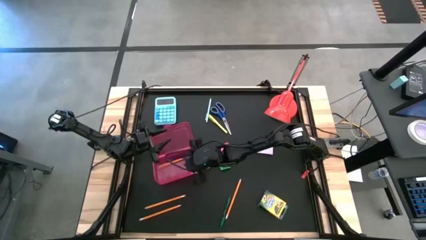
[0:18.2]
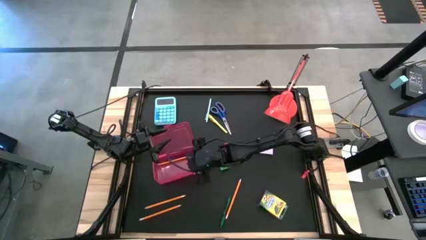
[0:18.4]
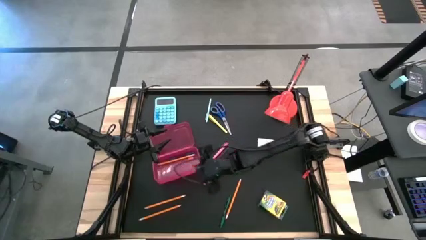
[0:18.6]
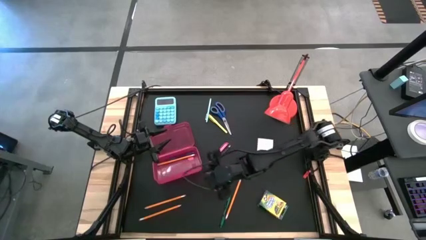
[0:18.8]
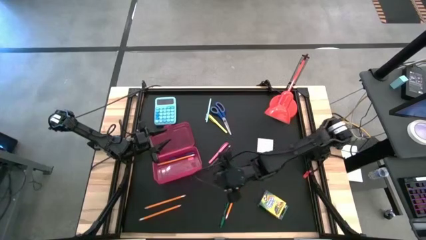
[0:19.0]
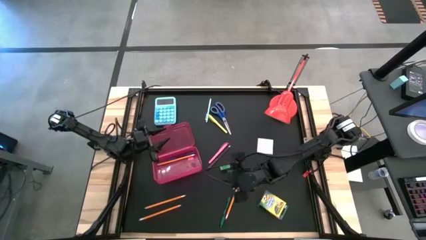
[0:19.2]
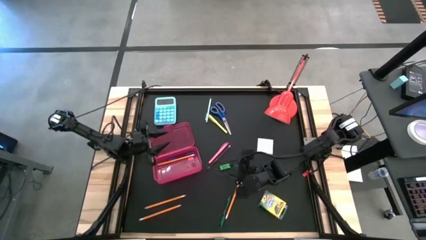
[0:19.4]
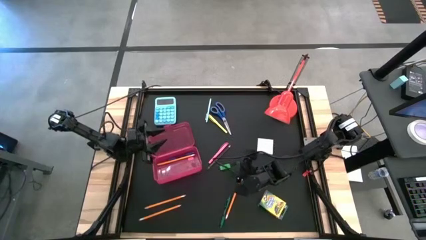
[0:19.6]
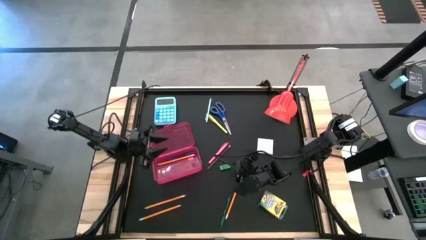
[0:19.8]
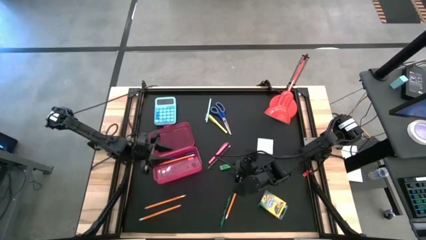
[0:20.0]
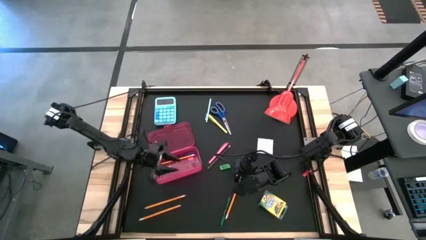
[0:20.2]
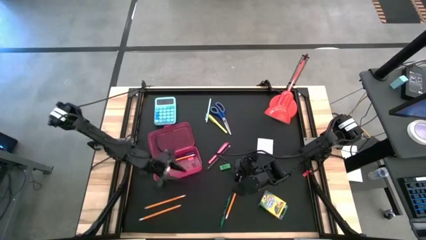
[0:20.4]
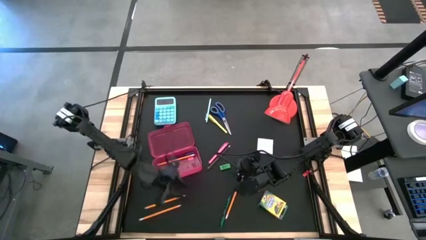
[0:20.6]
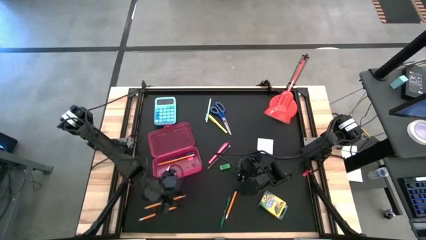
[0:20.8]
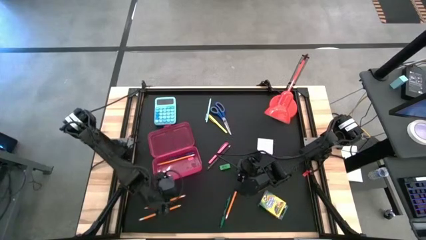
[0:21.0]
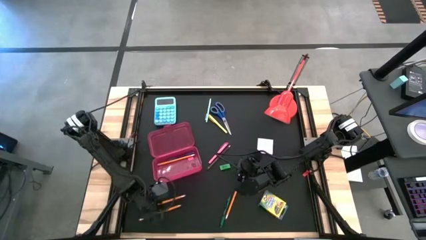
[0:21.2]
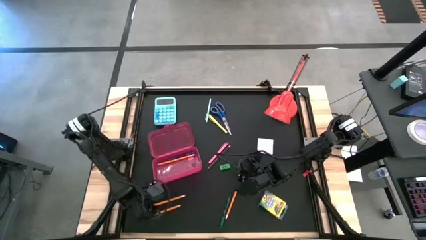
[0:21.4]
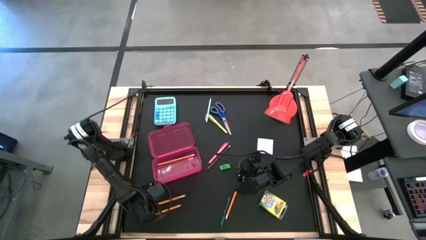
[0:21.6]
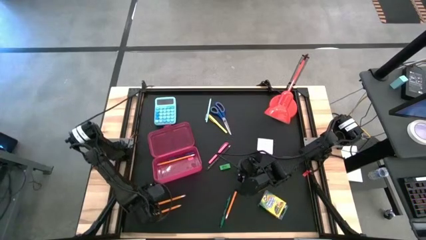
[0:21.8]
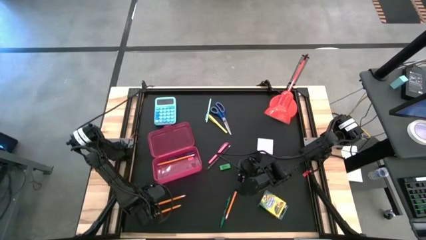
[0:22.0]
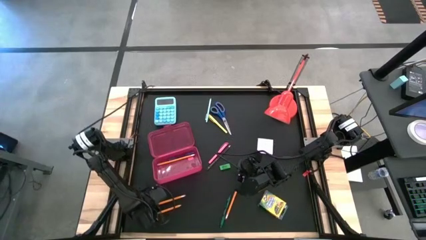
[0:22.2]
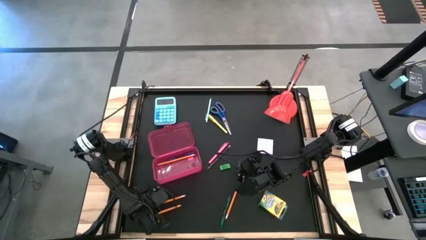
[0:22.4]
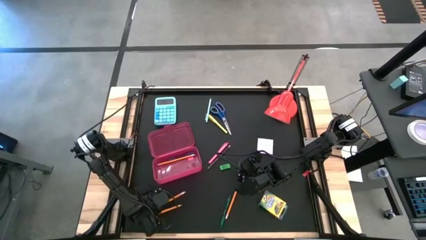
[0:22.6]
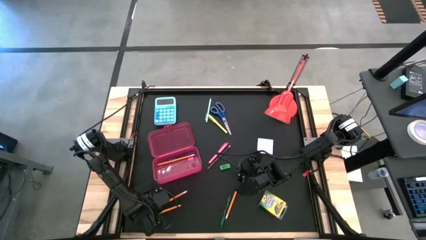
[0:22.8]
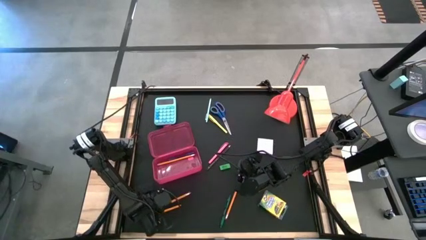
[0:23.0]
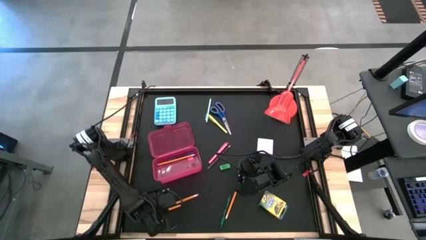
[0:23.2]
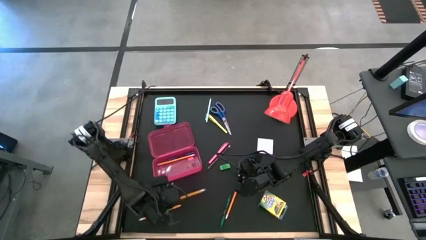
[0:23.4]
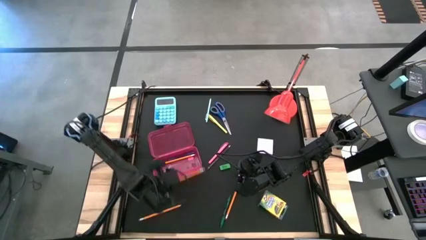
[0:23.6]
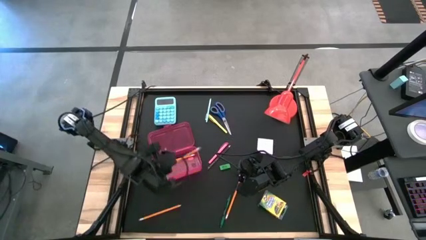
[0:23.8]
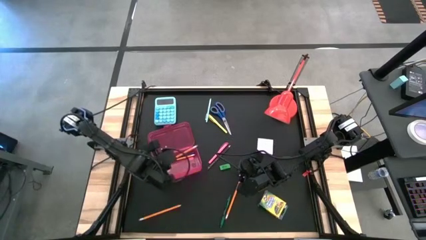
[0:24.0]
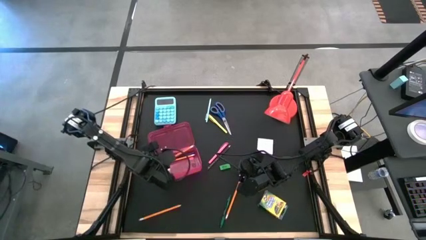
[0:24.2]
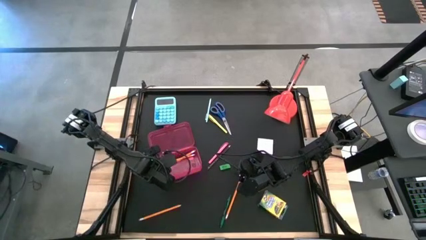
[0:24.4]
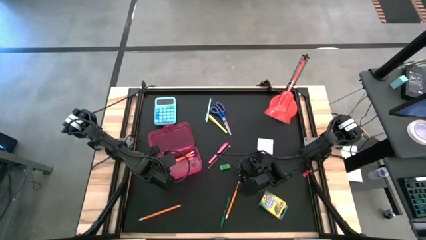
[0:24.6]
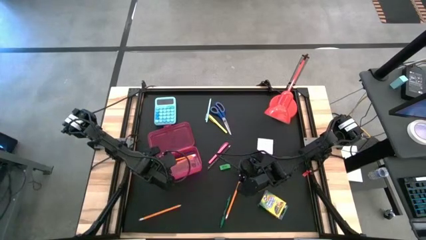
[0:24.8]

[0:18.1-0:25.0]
Task: Pack school essentials
Put the yellow pencil into the pink supply box

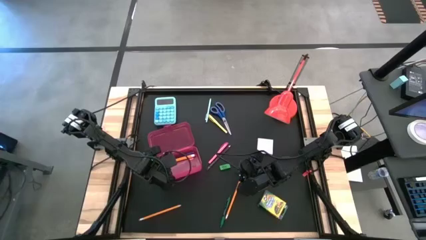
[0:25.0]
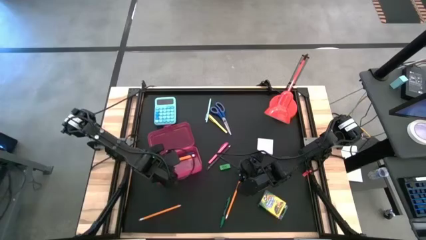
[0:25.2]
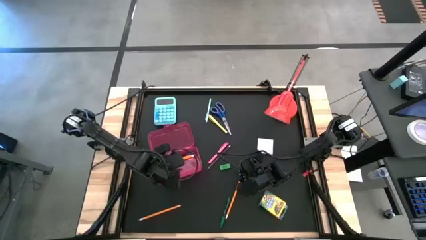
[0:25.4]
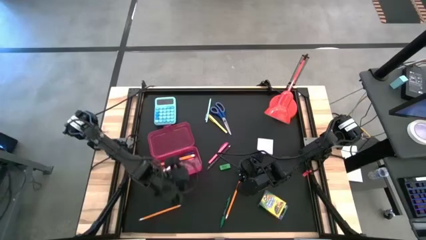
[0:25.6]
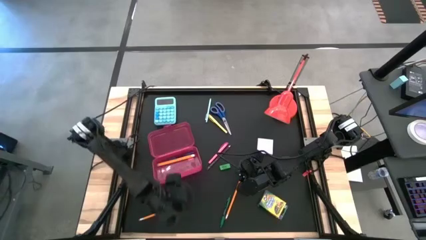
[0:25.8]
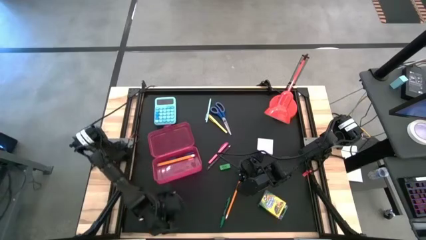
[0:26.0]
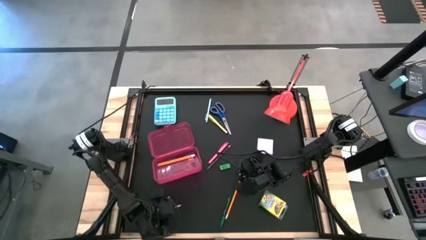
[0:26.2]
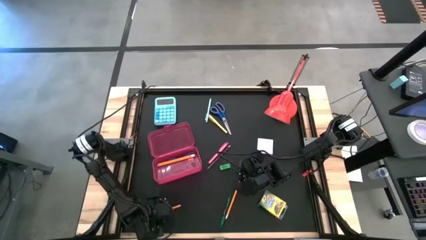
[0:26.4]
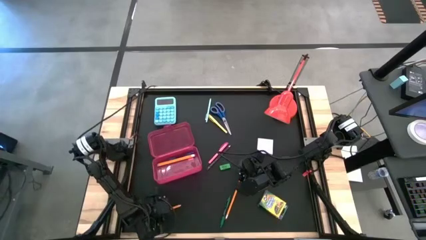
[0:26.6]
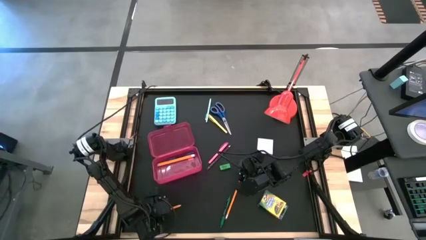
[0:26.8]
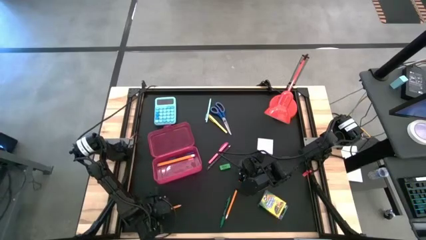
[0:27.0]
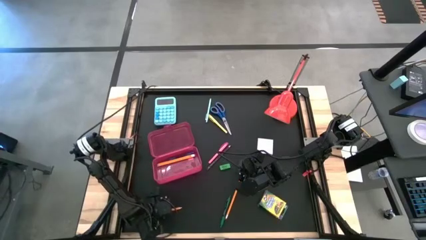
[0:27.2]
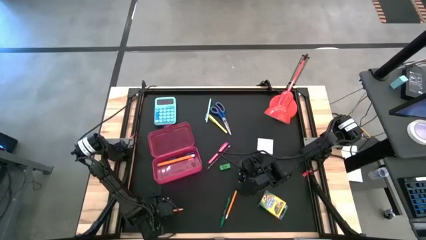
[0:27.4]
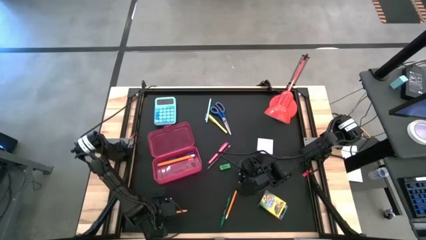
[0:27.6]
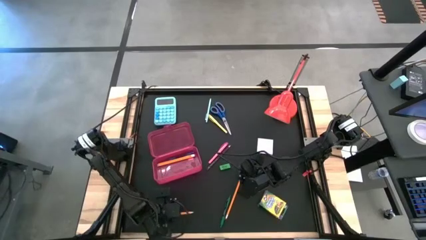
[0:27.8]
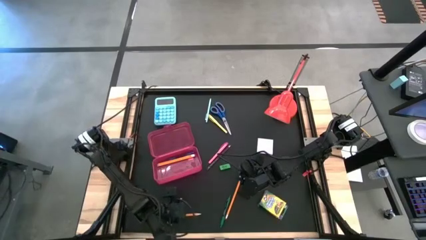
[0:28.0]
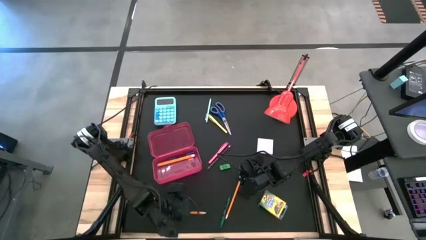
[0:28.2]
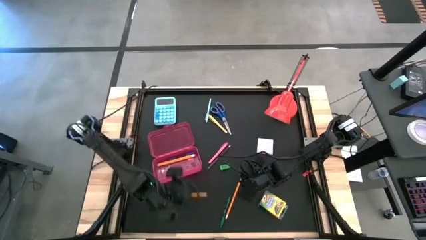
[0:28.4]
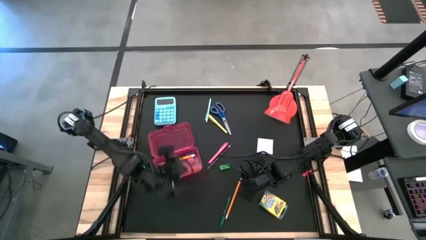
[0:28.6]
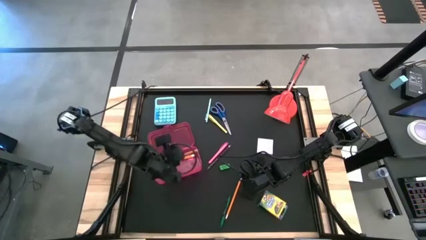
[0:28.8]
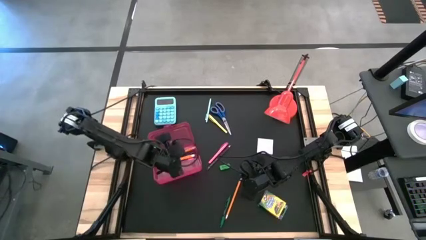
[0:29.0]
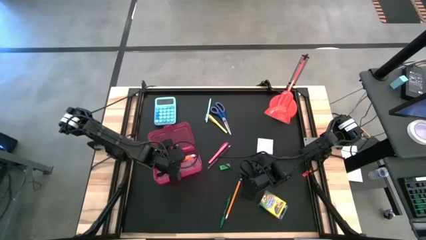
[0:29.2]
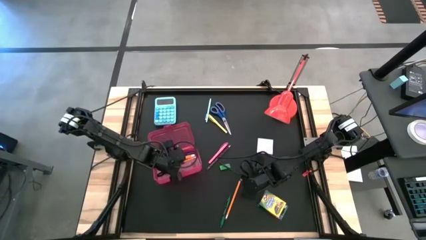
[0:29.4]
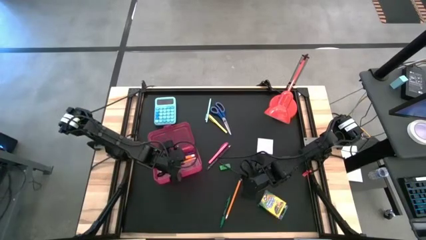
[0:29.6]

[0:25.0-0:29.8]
Put the yellow pencil into the pink supply box

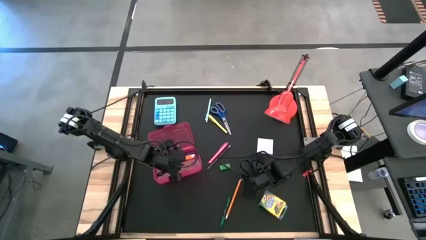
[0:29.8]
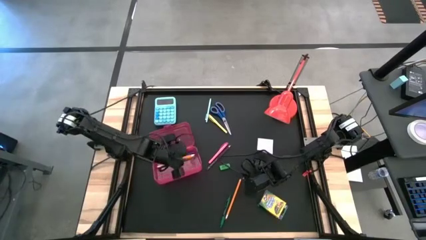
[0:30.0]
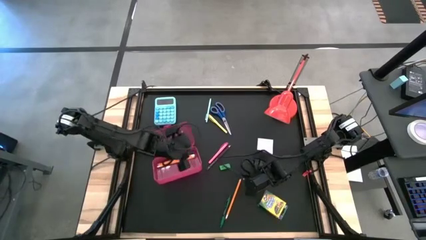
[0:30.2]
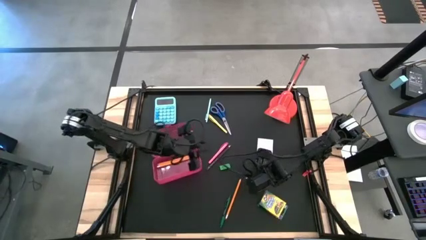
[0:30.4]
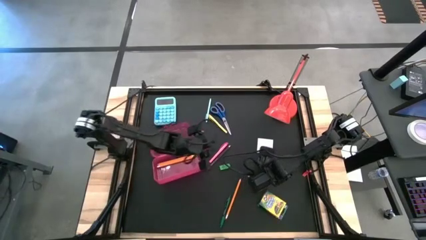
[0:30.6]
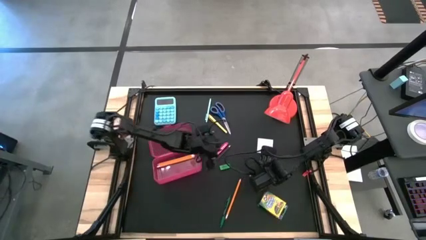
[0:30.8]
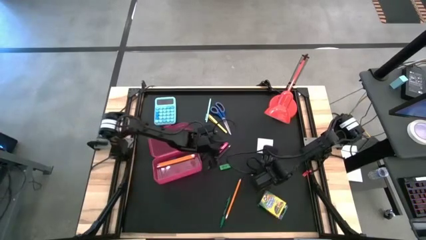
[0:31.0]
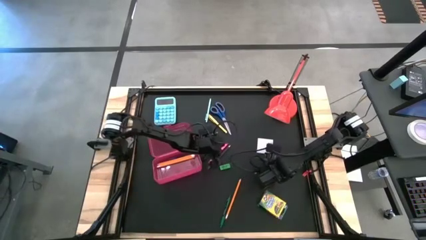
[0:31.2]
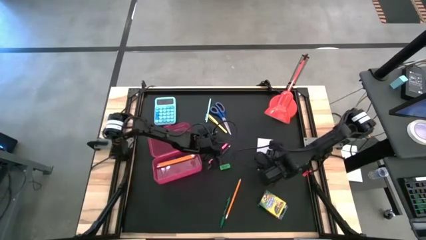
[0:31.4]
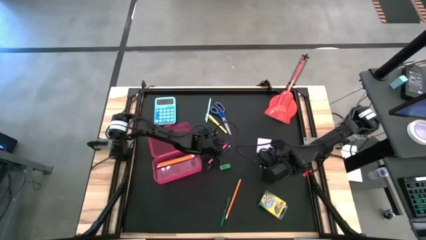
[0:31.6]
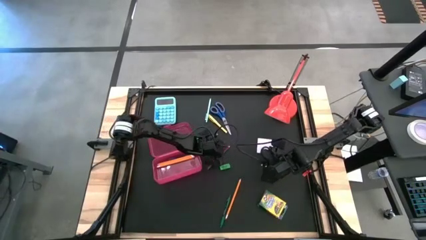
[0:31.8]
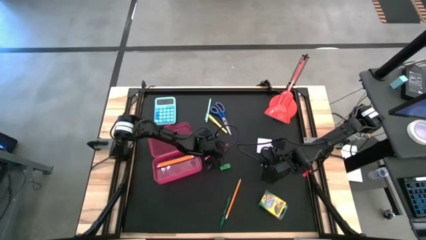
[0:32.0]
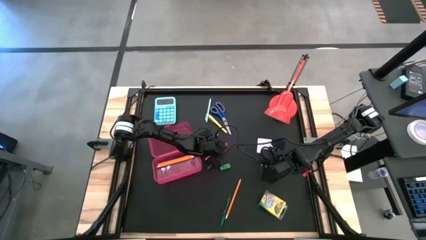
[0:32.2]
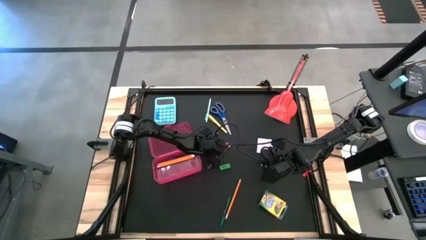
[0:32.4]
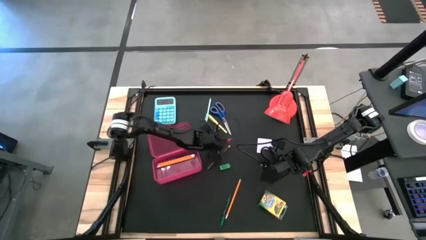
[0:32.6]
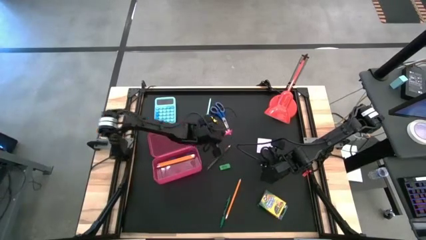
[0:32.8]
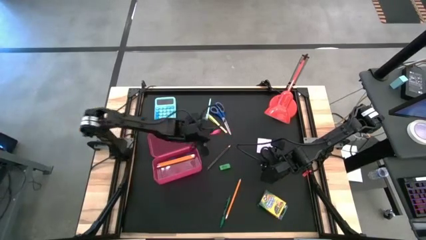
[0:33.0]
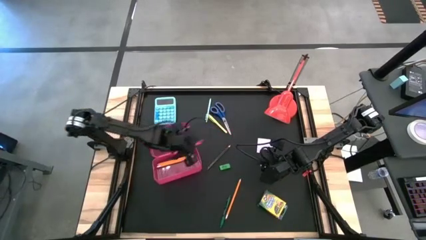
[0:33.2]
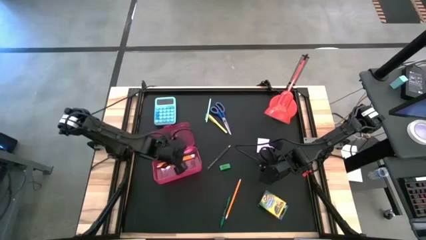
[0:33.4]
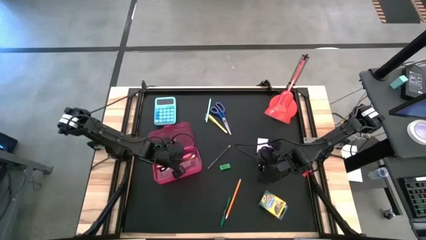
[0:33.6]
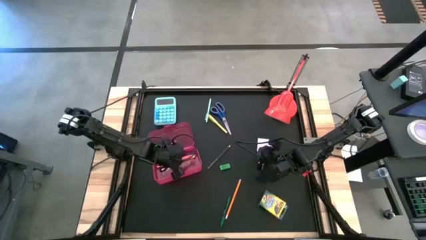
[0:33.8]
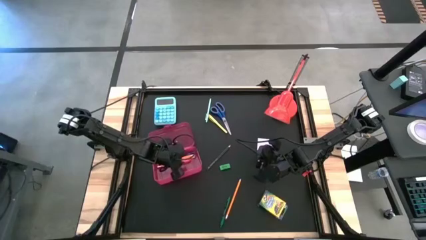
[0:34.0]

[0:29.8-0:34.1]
Put the pink pen into the pink supply box

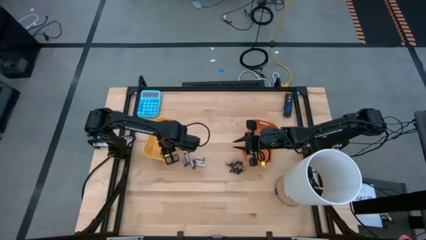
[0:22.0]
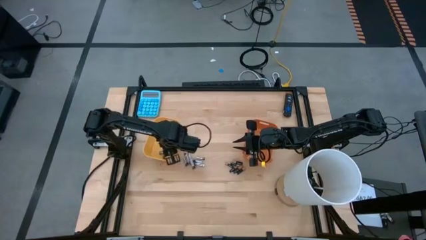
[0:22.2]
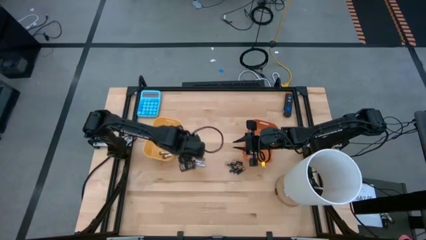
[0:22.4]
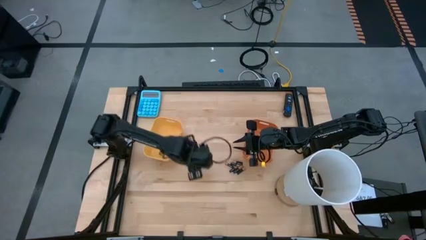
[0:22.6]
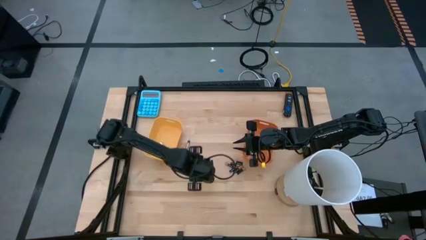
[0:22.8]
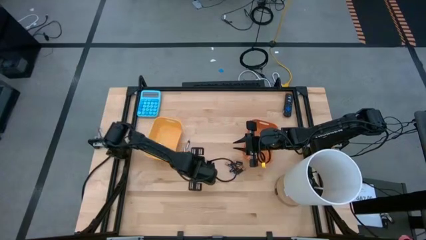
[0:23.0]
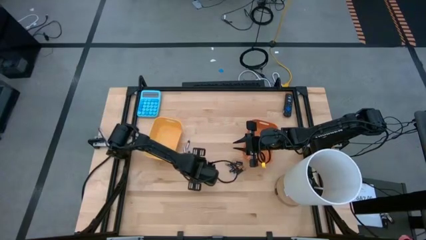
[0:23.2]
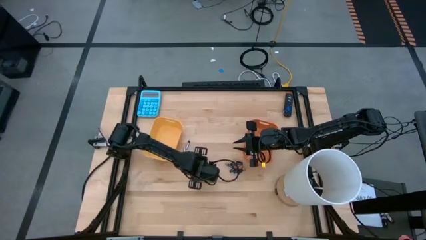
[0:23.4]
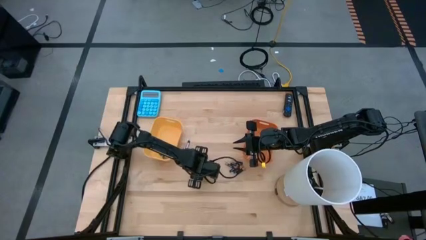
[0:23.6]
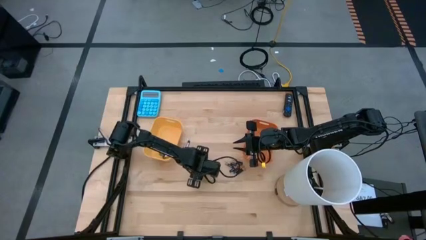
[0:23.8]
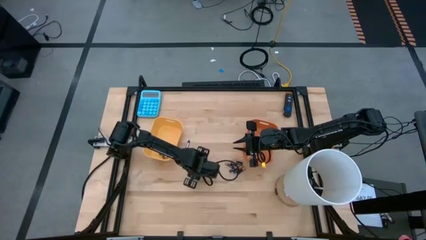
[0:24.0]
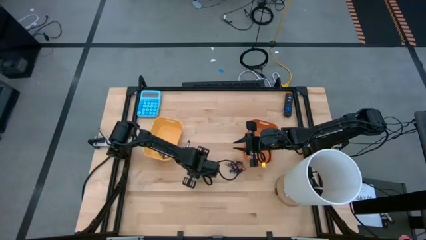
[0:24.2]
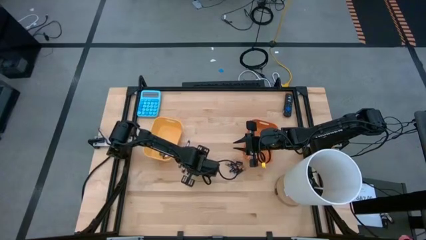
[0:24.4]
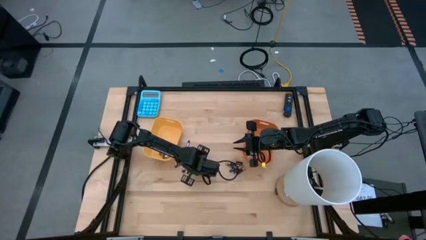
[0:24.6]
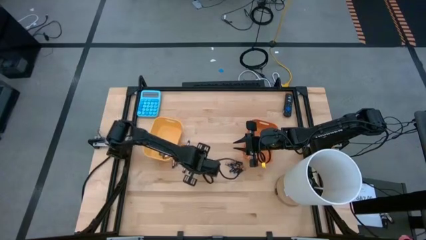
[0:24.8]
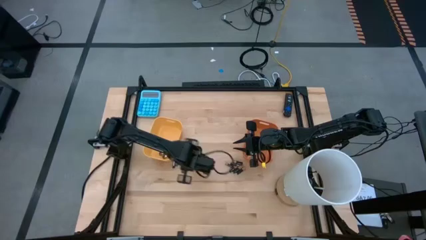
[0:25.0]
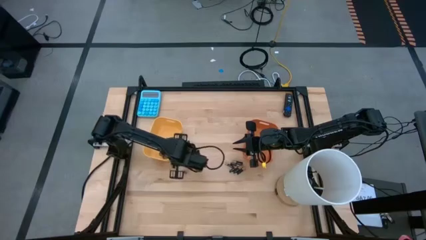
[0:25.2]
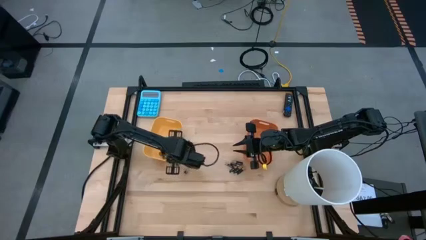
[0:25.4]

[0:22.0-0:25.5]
Task: Sort batteries
Put the silver battery into the yellow bin
